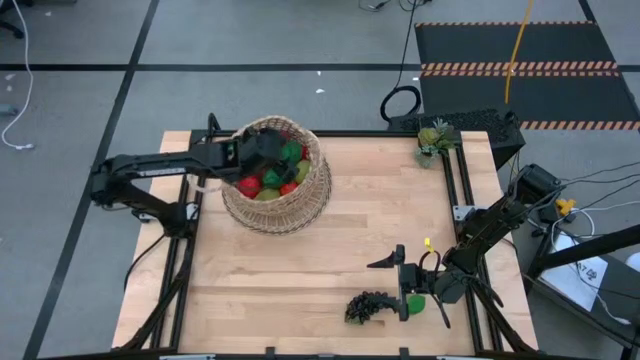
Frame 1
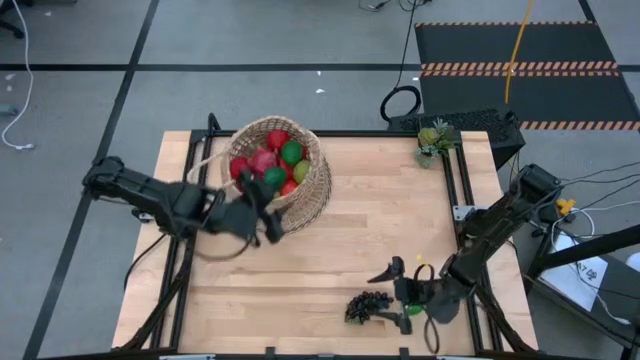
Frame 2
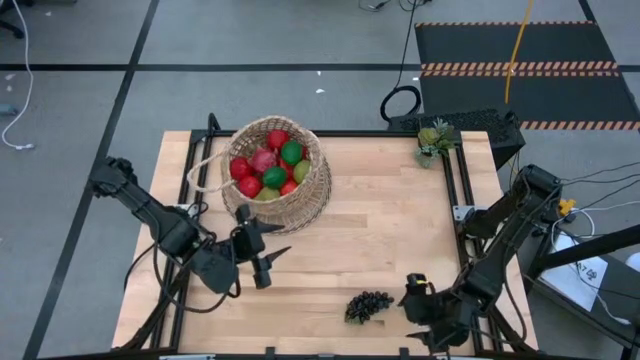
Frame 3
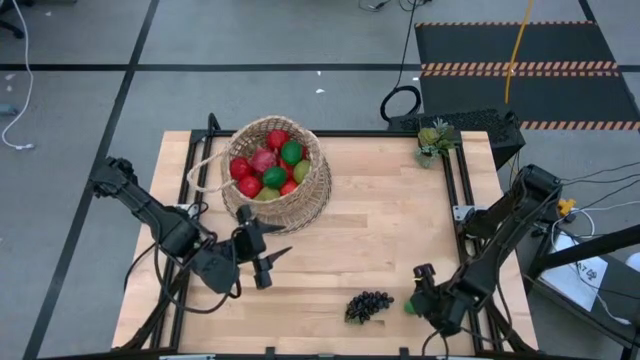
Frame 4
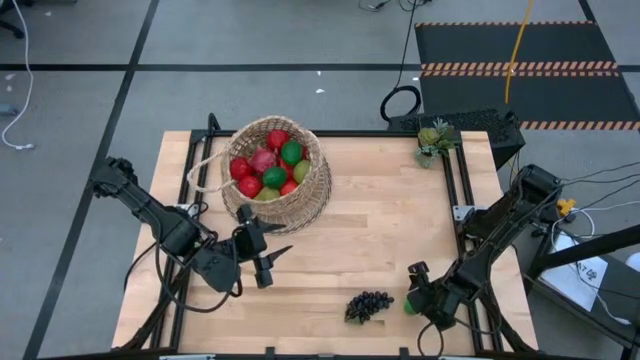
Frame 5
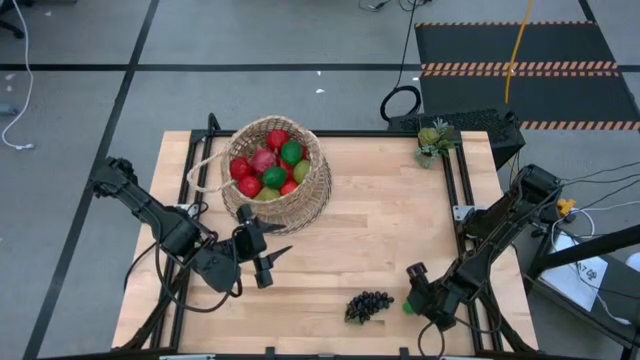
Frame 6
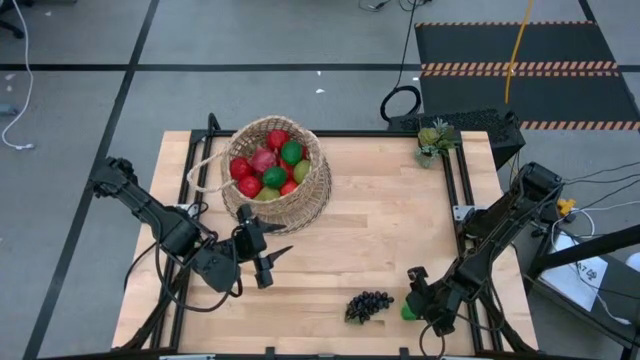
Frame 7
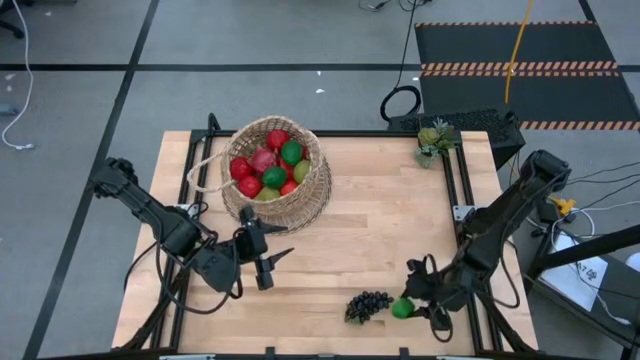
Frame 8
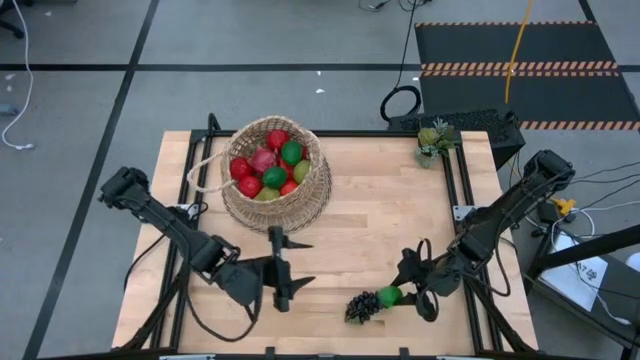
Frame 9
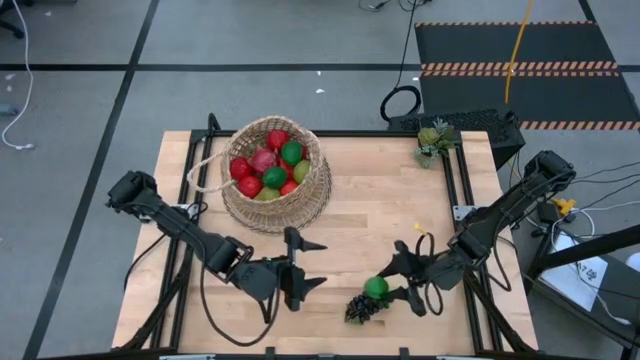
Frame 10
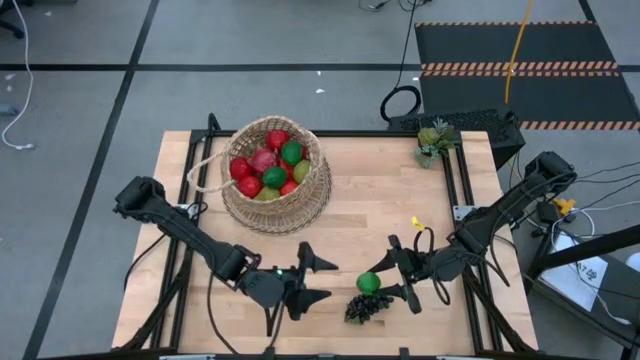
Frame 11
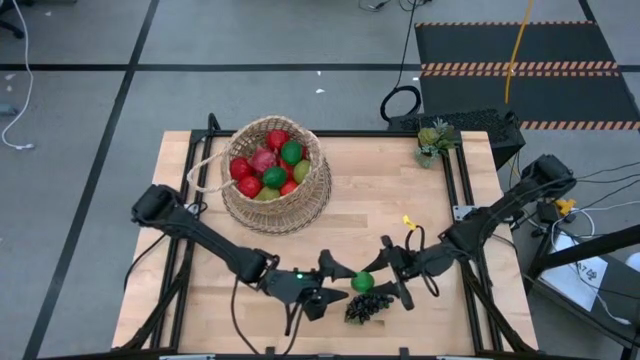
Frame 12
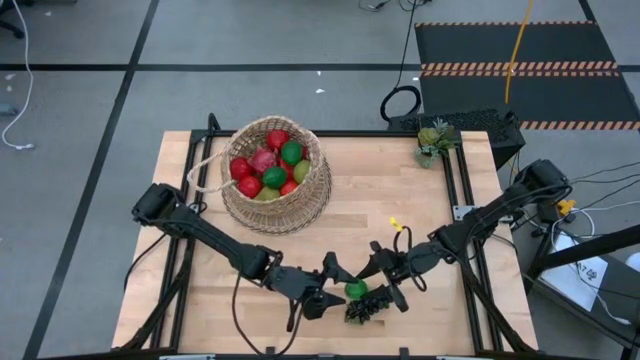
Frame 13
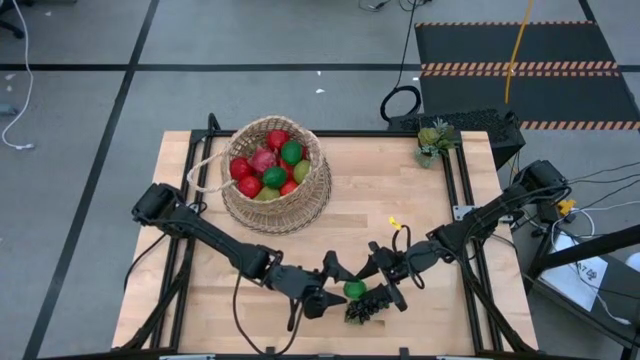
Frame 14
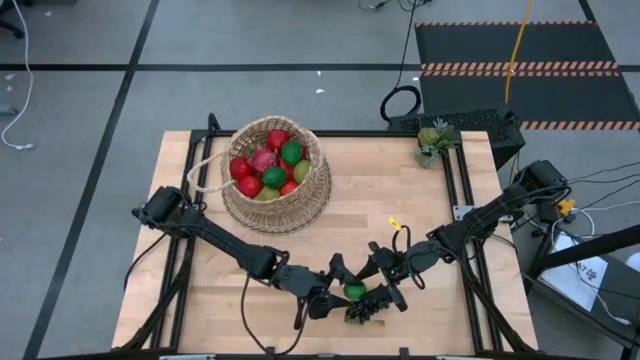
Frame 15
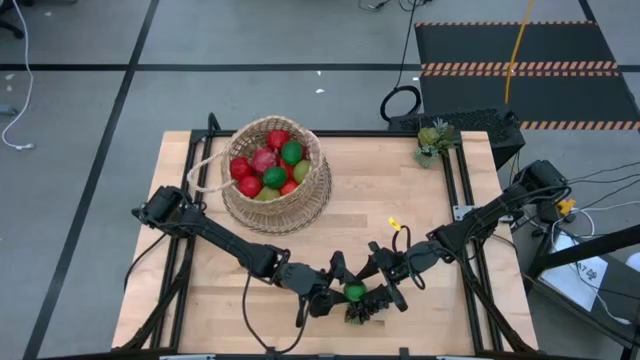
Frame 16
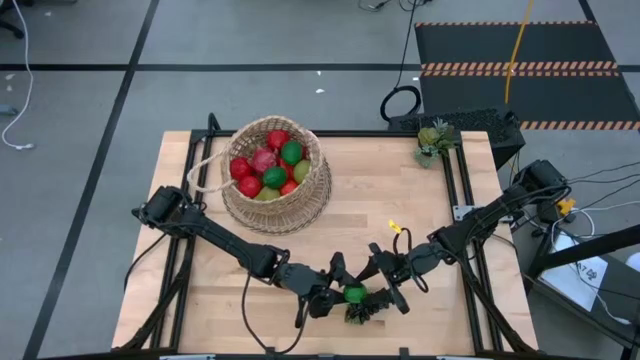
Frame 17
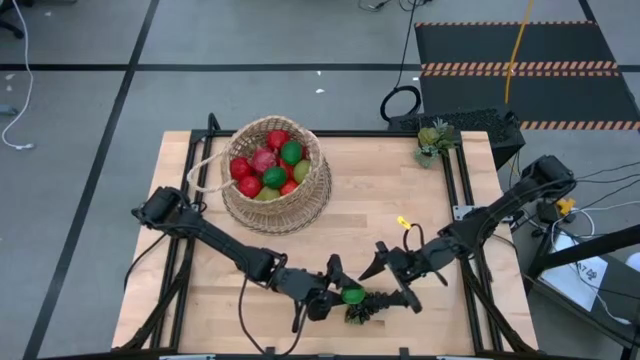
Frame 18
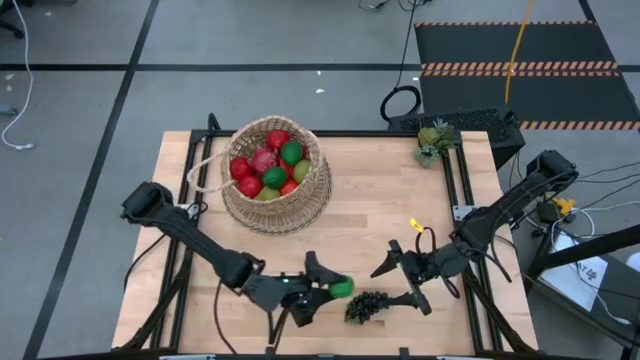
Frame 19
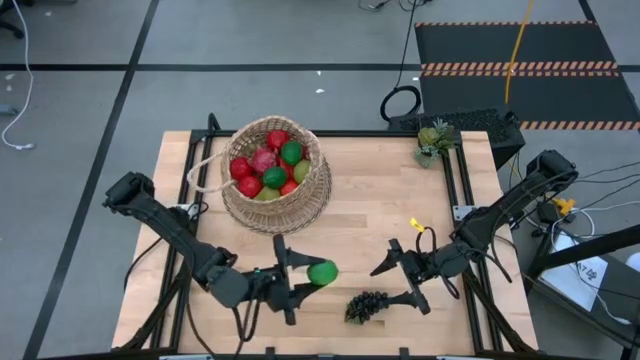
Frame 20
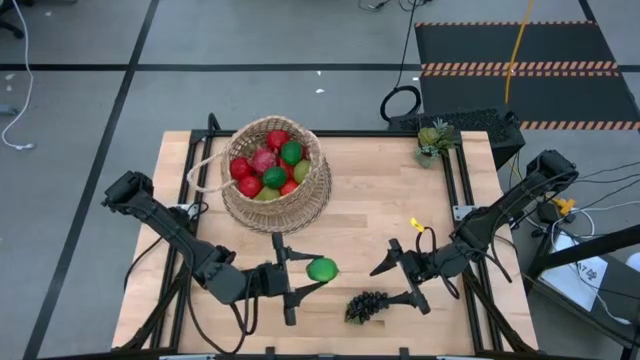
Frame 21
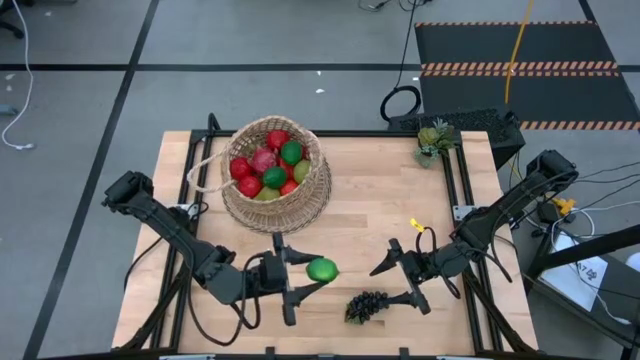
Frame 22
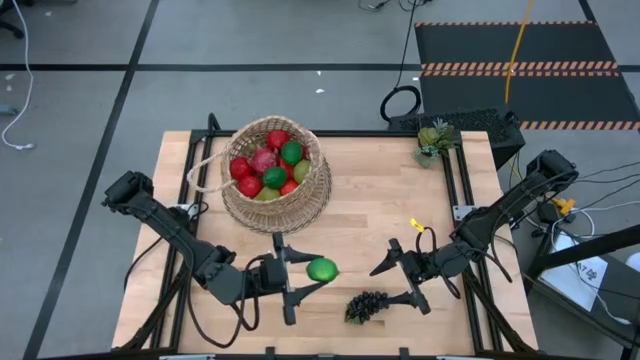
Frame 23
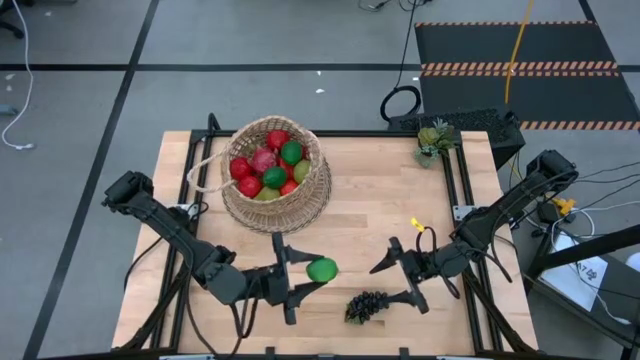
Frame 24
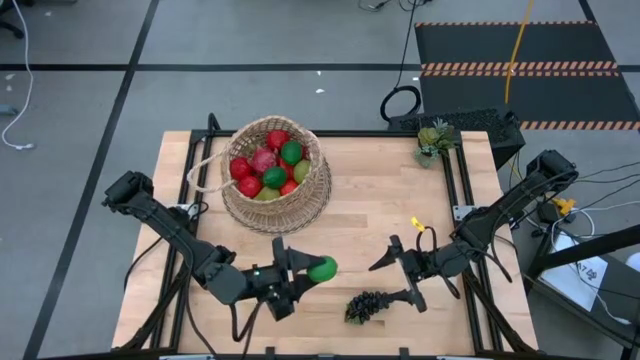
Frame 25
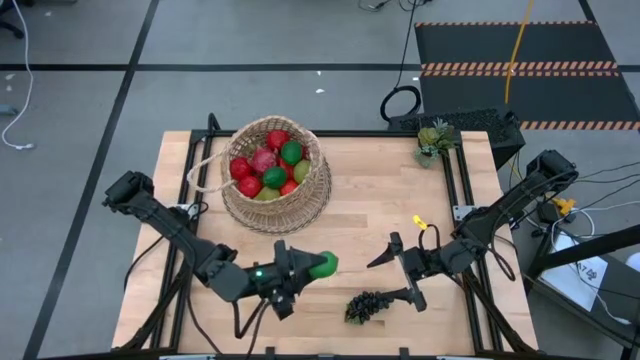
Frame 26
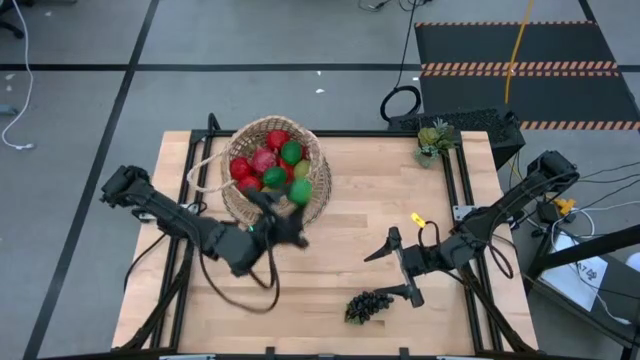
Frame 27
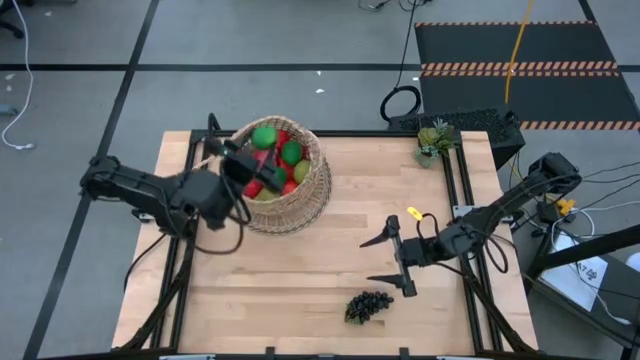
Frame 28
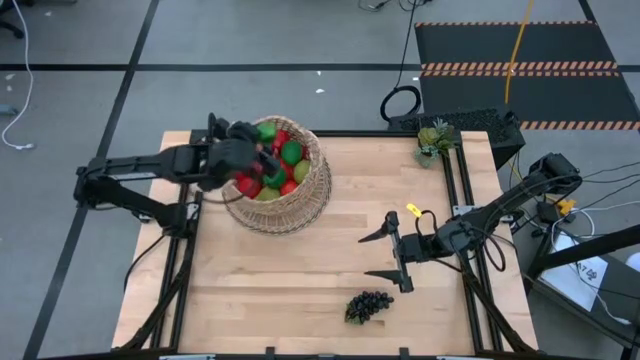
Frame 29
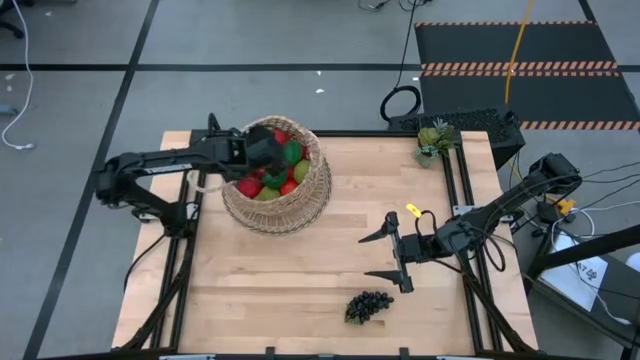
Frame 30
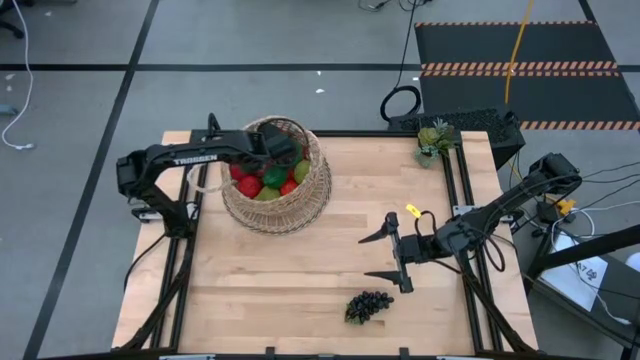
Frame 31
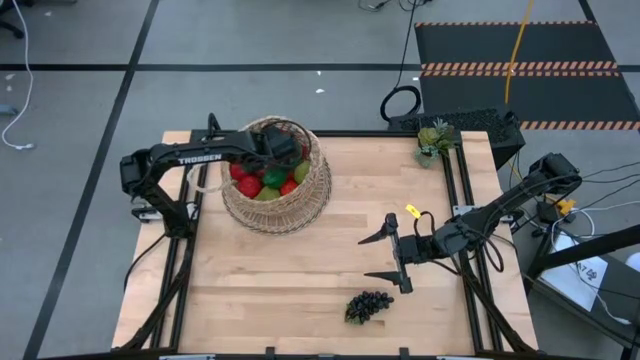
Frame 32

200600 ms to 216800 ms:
Task: Build produce basket
Put the lime into the basket

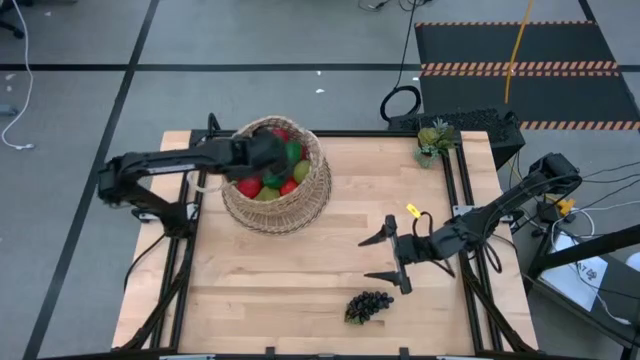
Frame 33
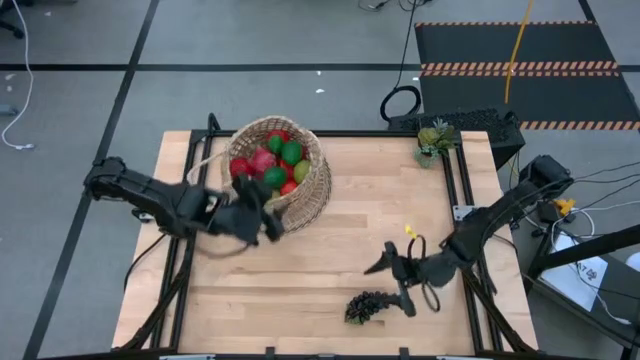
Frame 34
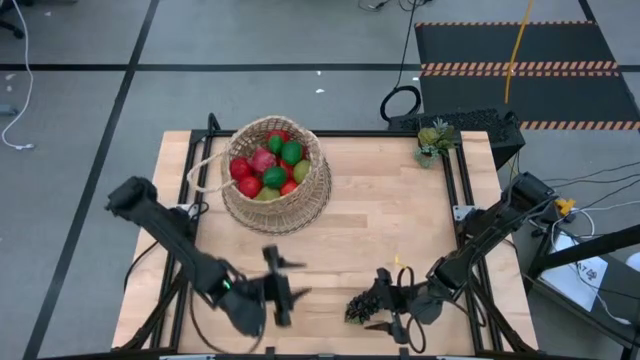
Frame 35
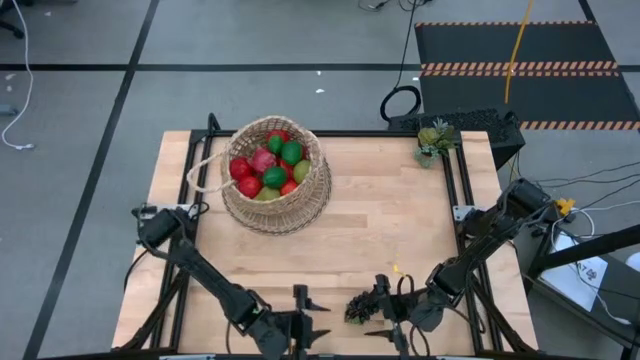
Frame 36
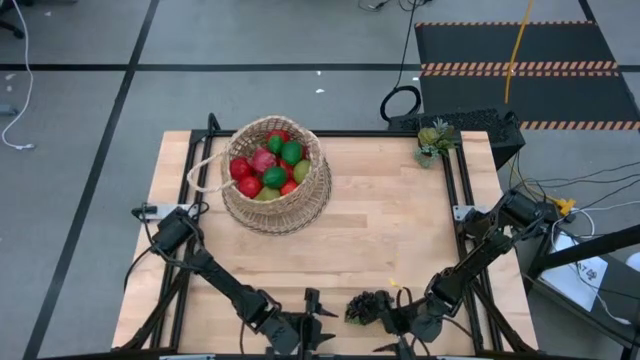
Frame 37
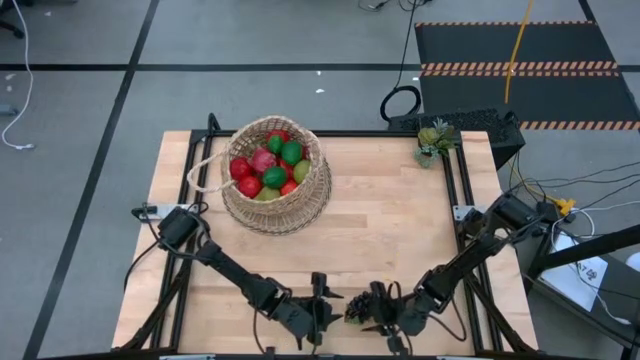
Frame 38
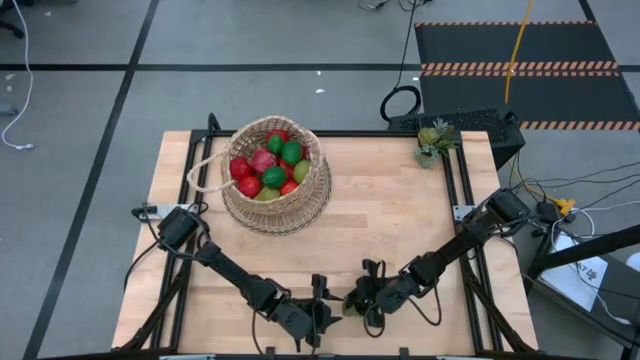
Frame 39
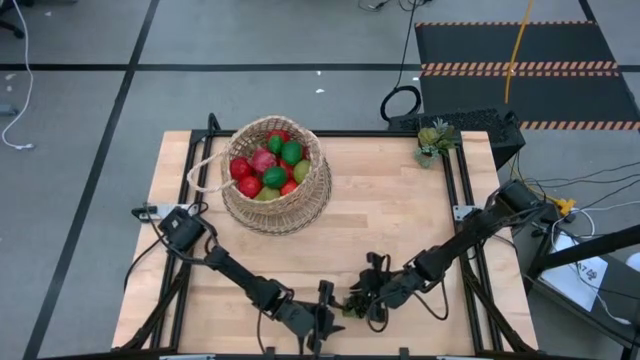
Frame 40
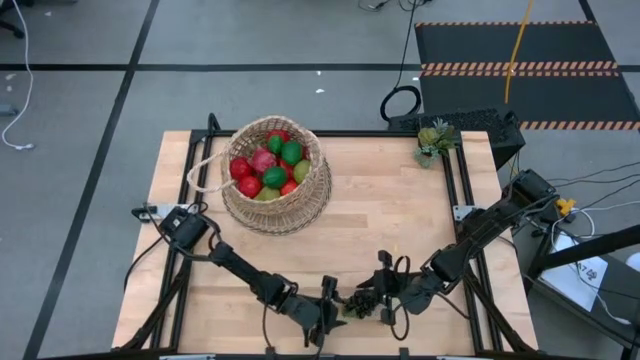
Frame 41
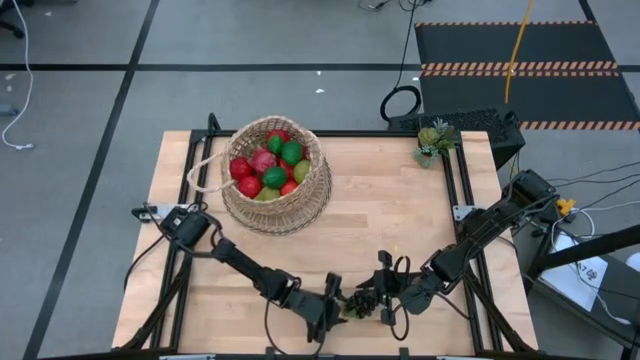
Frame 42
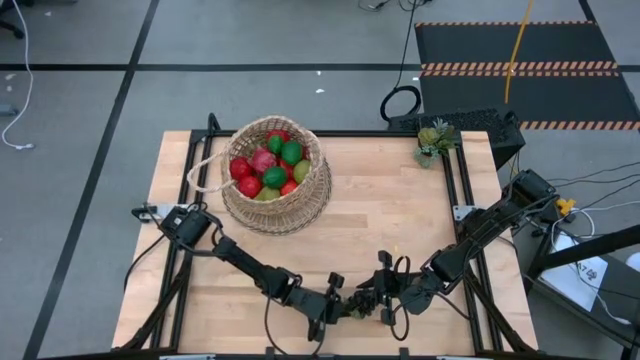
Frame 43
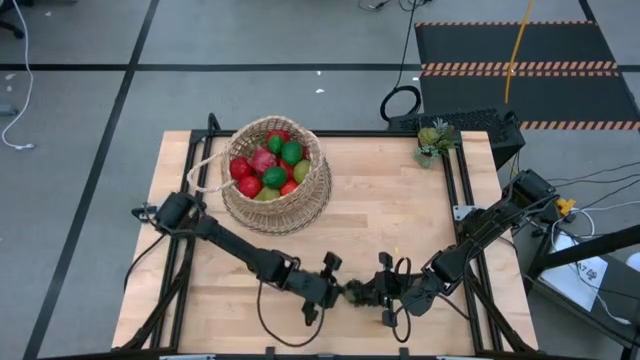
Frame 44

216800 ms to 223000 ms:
Put the grapes into the basket
